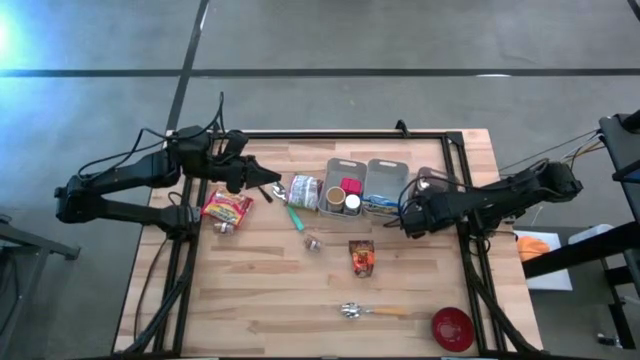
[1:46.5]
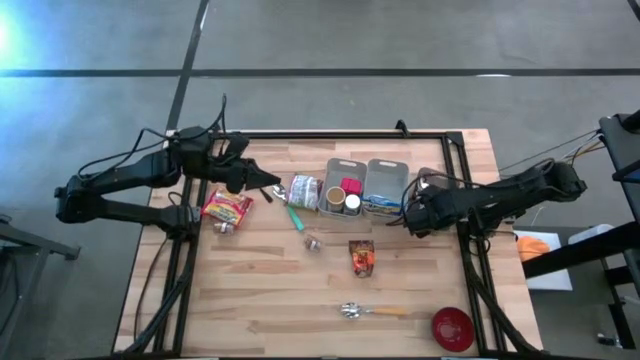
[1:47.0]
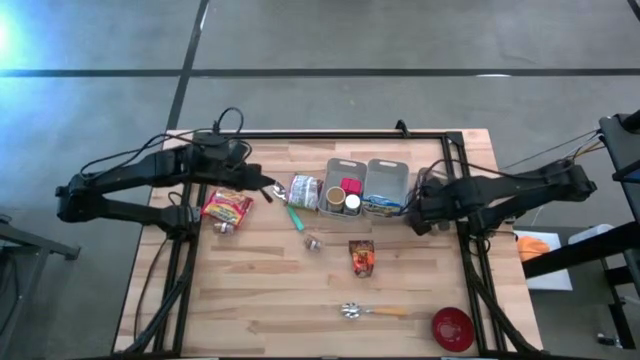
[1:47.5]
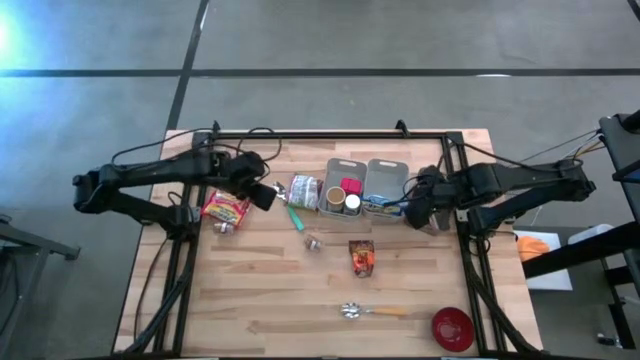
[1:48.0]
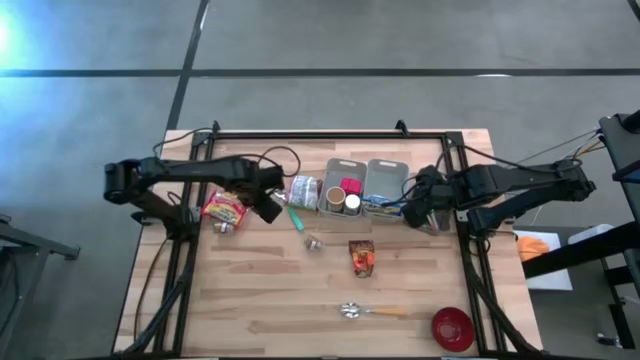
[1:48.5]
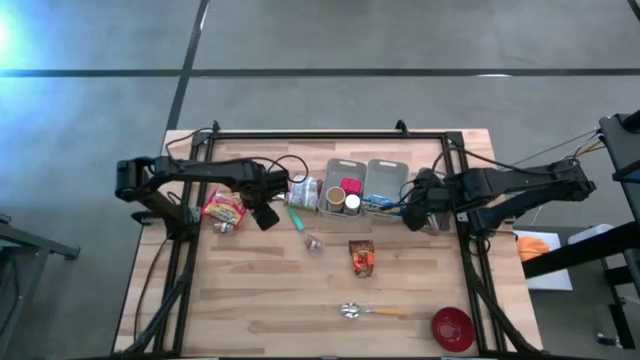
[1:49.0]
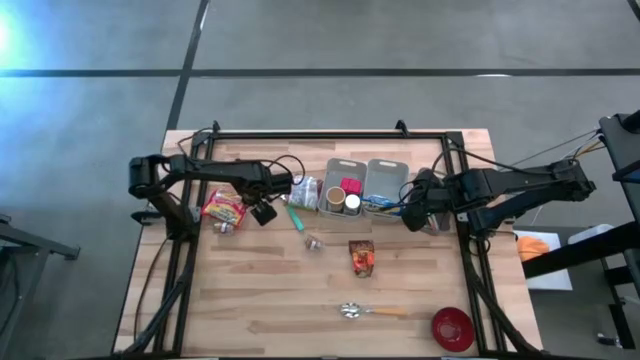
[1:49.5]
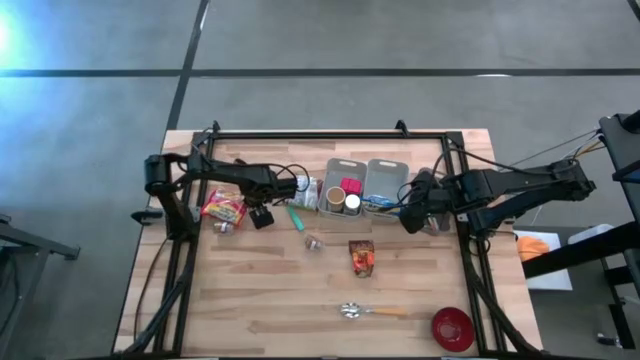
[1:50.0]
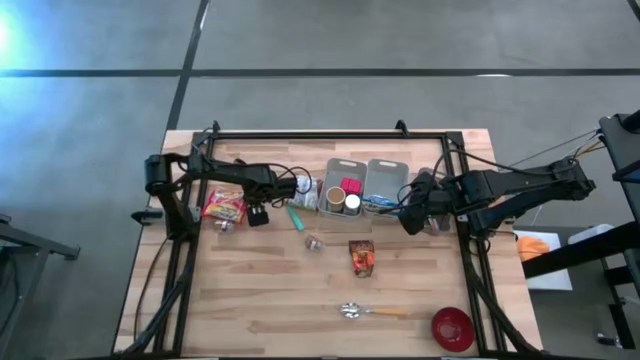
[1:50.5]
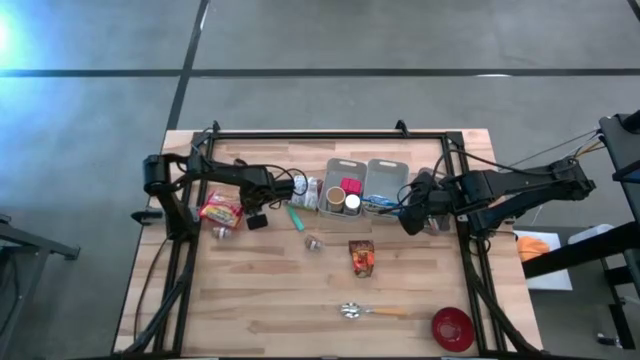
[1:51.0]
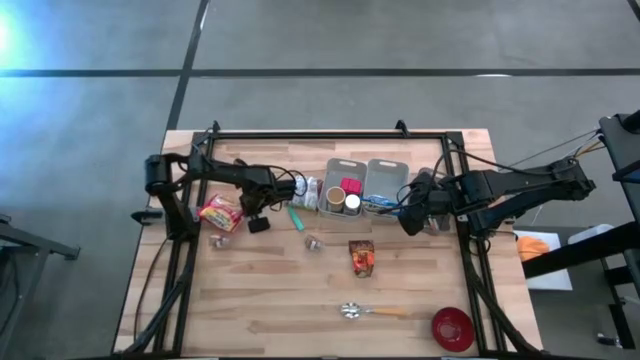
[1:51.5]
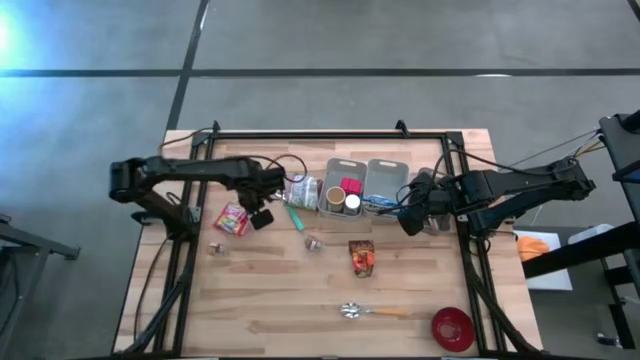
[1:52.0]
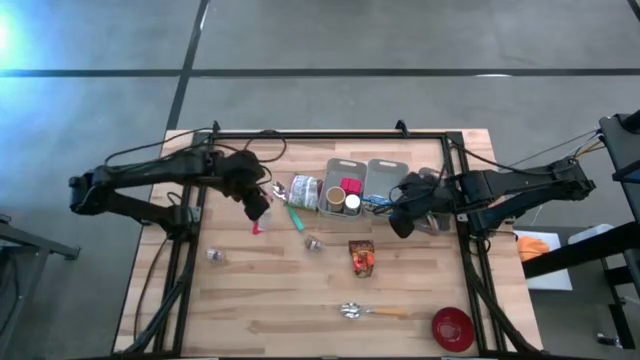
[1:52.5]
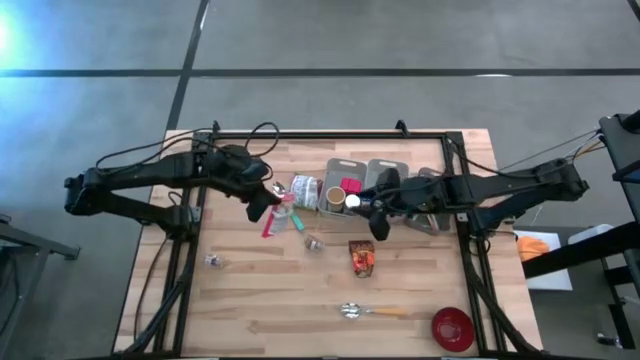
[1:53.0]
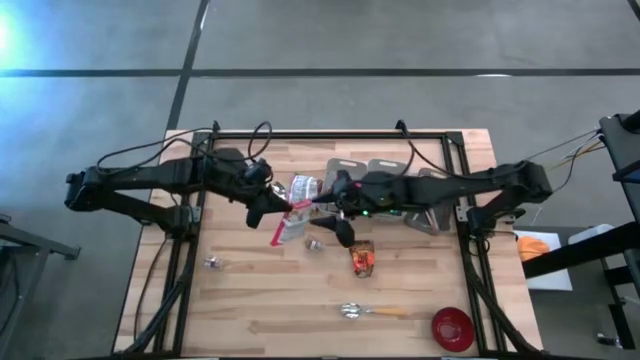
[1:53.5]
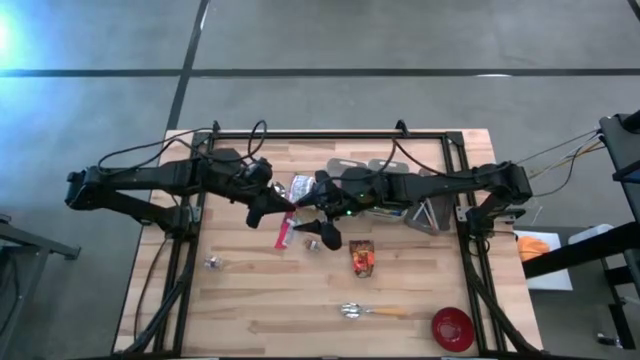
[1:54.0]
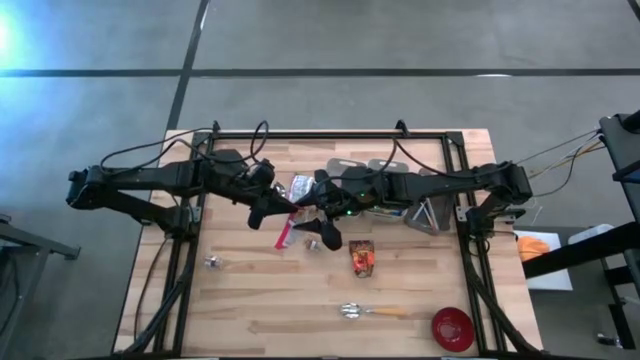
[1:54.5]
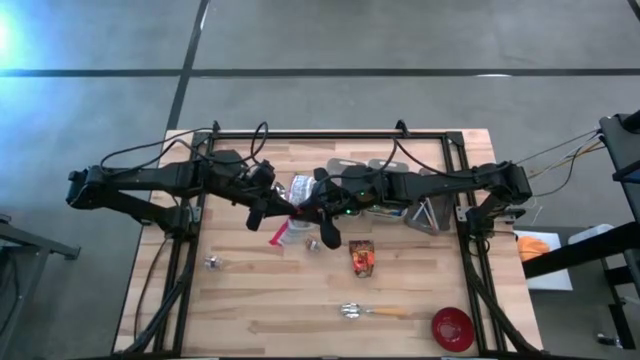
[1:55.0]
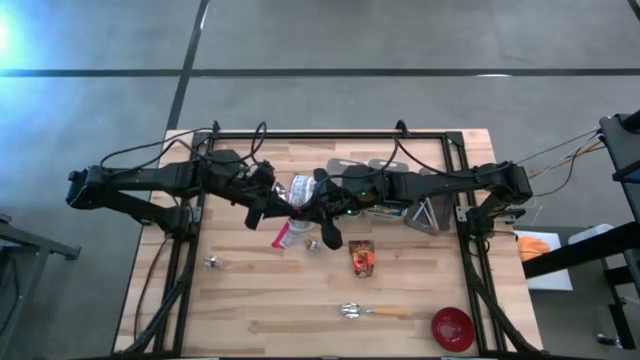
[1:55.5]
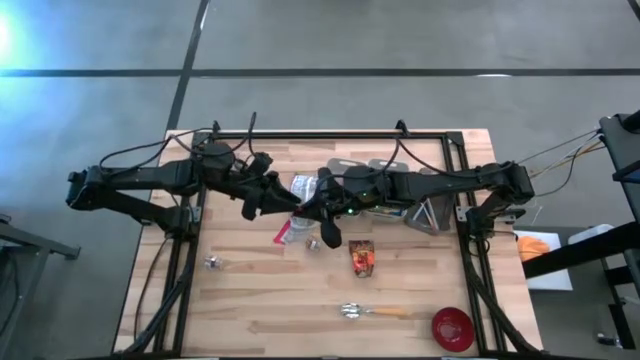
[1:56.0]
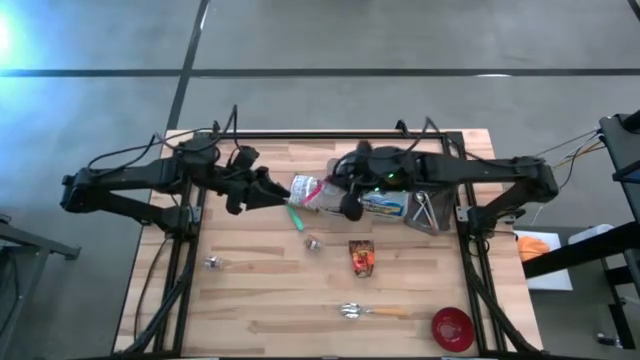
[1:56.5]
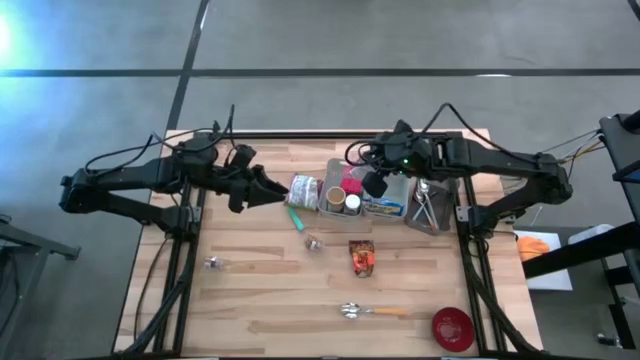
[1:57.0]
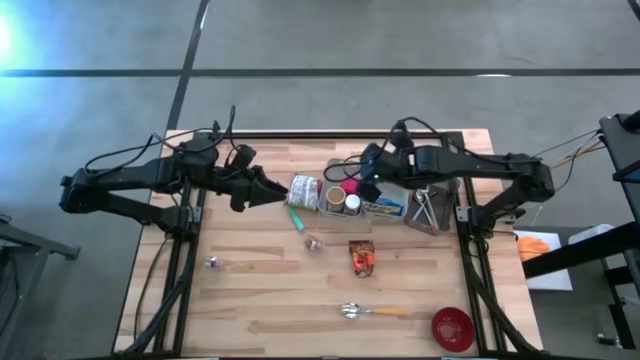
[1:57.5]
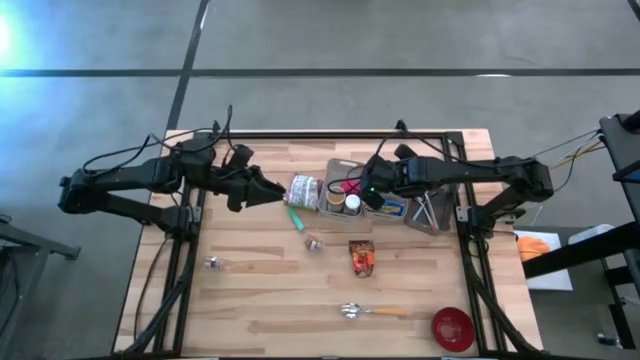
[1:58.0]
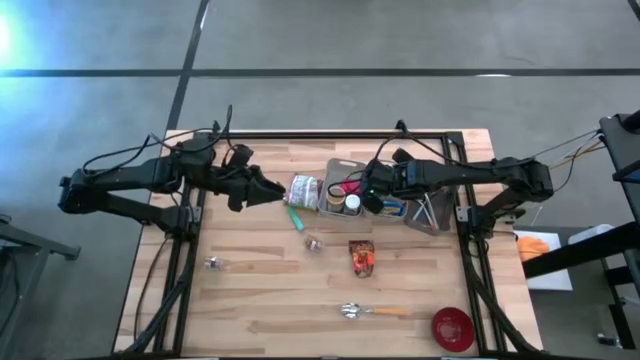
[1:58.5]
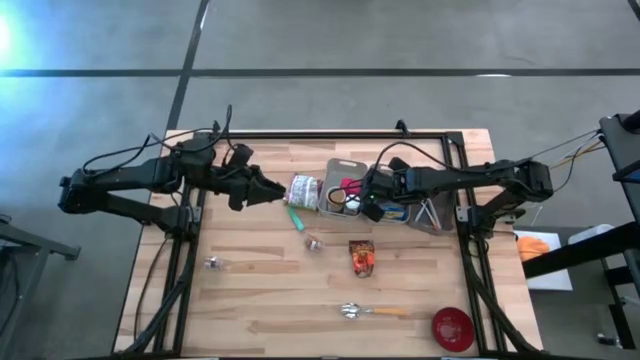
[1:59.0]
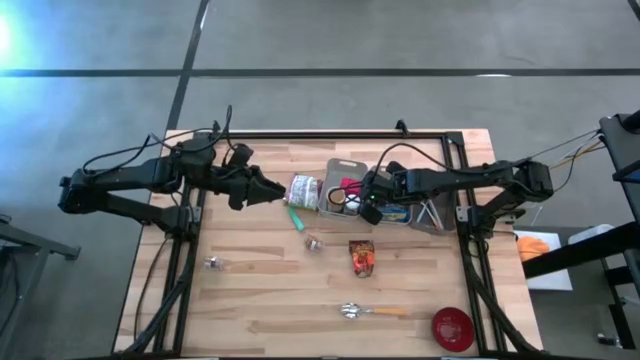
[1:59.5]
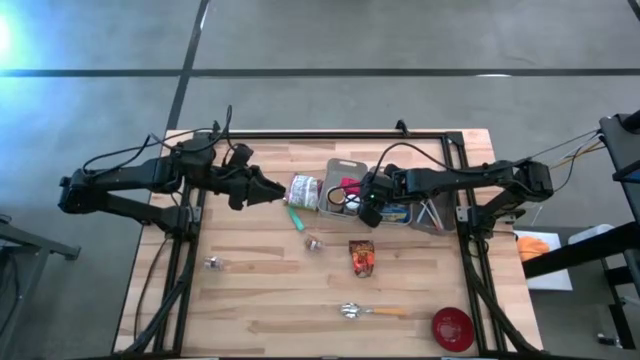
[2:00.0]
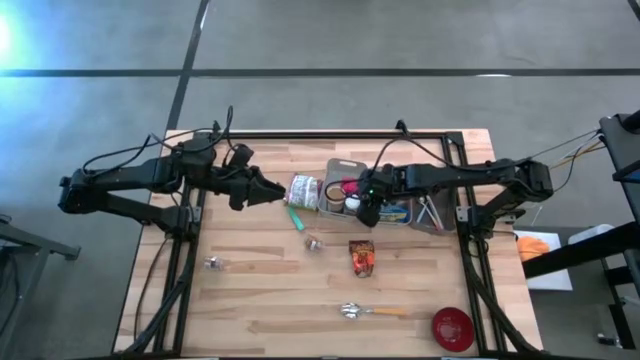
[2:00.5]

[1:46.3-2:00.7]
Put the red noodle pack into the right gray bin
